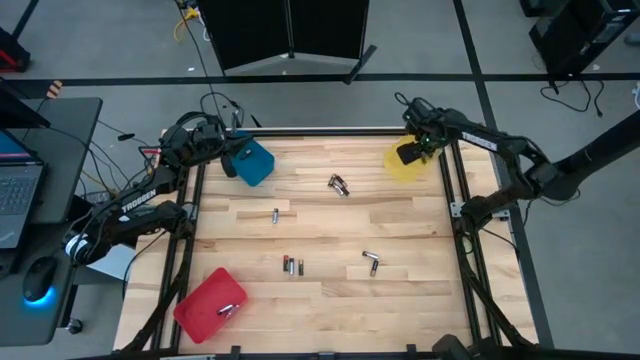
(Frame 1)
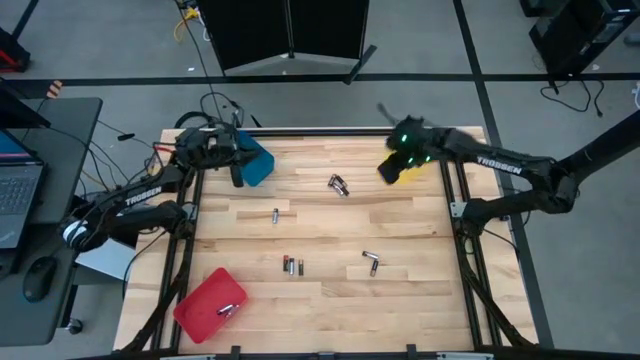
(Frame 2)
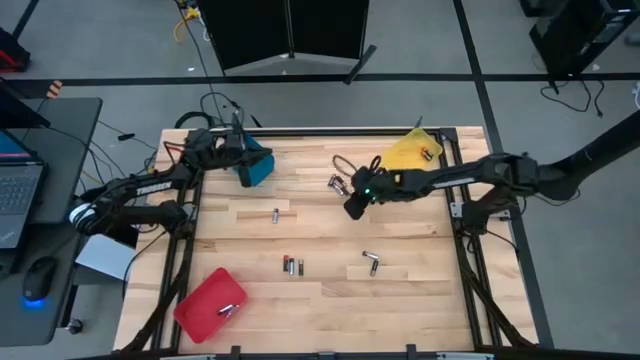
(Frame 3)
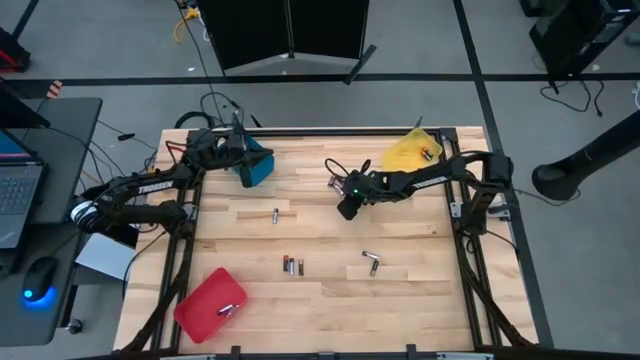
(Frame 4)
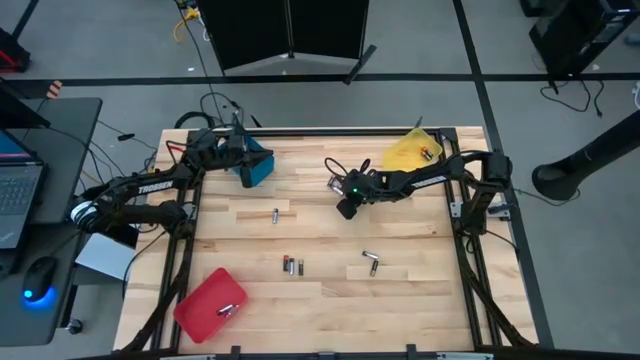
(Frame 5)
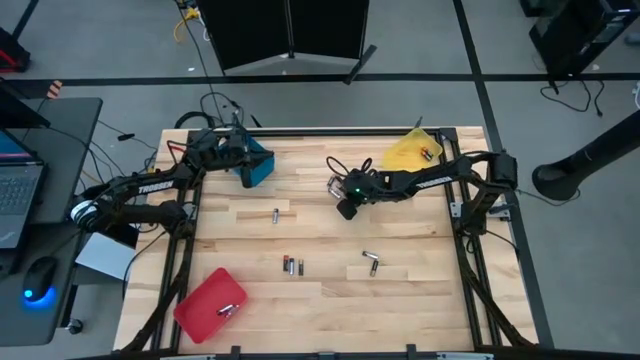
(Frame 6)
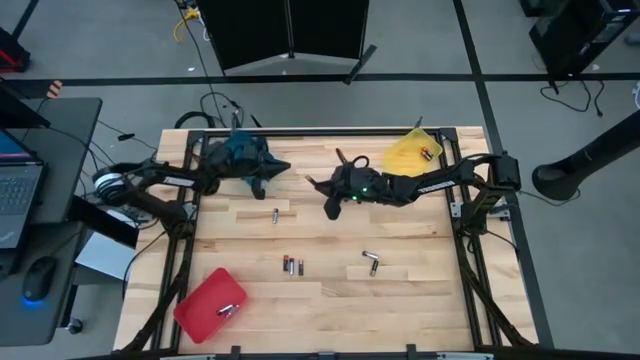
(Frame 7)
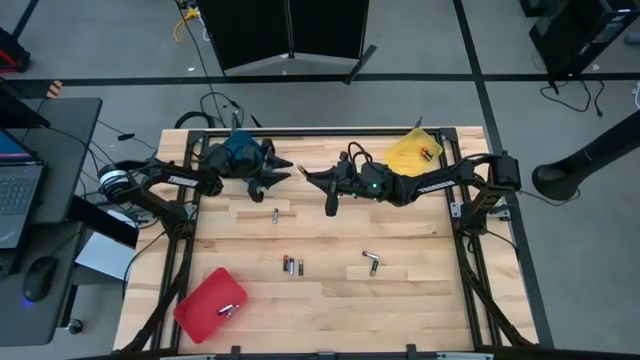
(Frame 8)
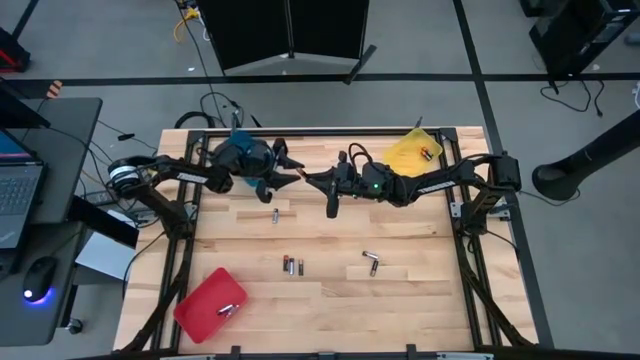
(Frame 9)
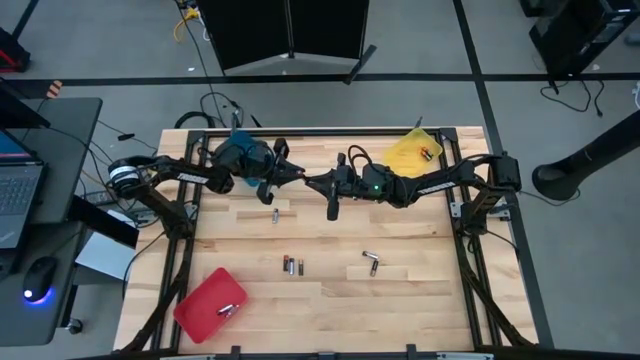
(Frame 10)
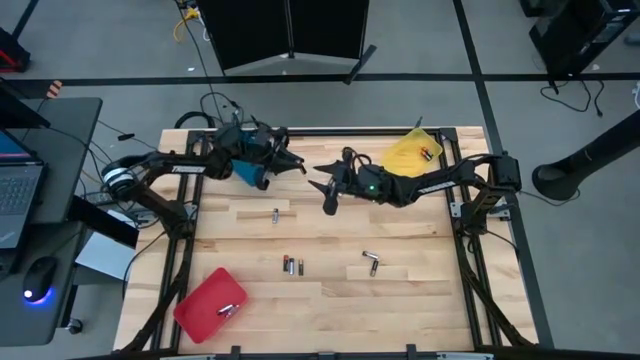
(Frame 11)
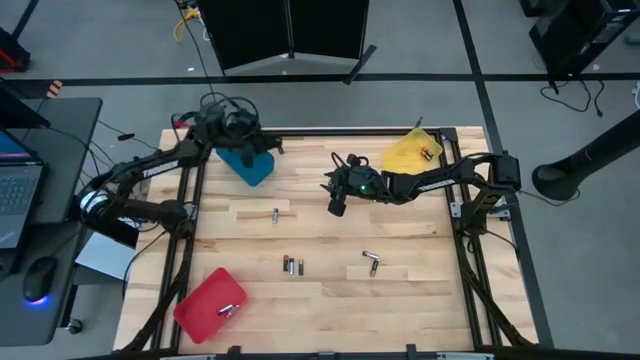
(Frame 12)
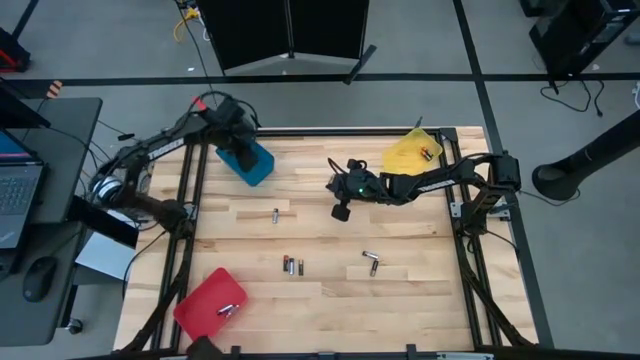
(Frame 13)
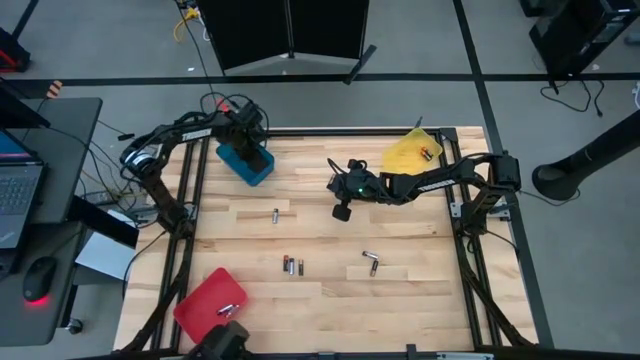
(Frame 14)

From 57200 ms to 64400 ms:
Task: Sort batteries
Put the black brown battery into the blue bin

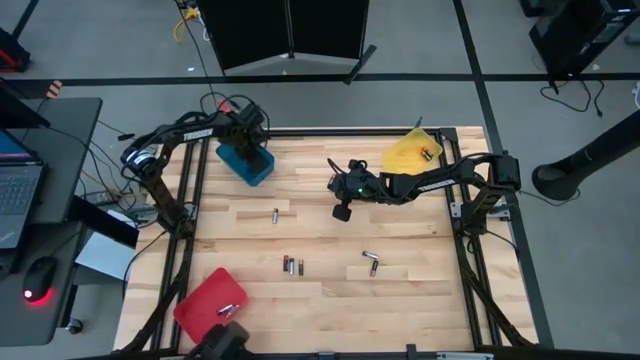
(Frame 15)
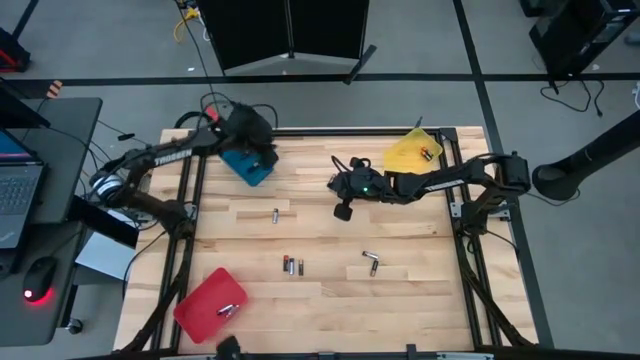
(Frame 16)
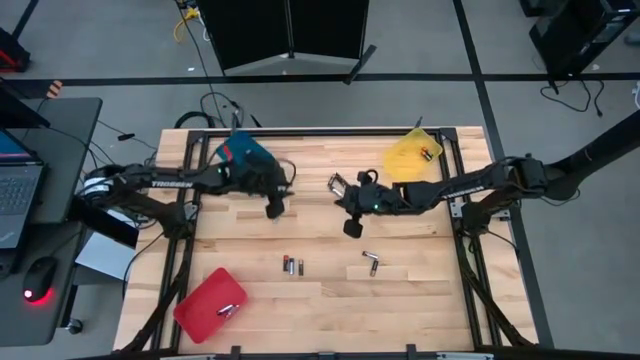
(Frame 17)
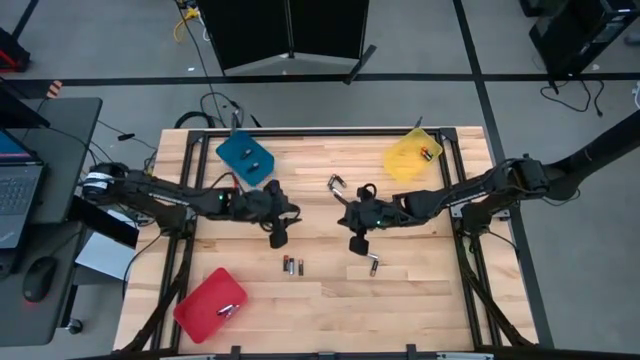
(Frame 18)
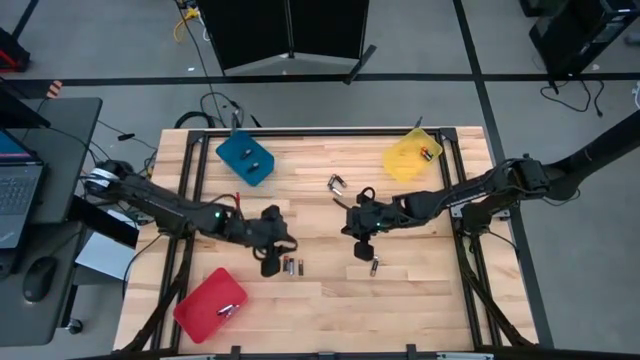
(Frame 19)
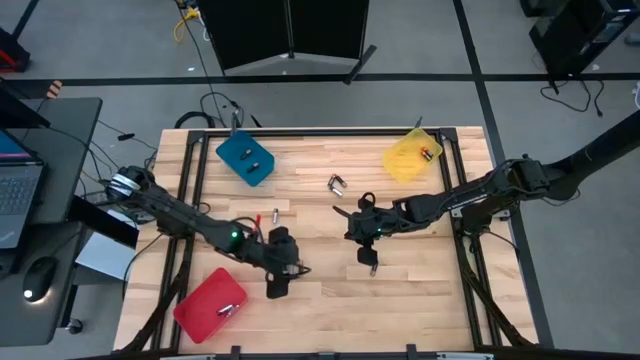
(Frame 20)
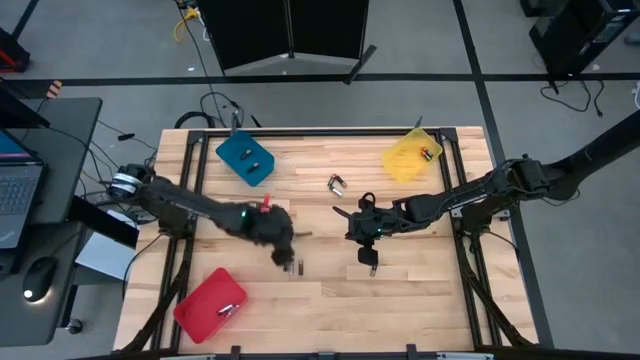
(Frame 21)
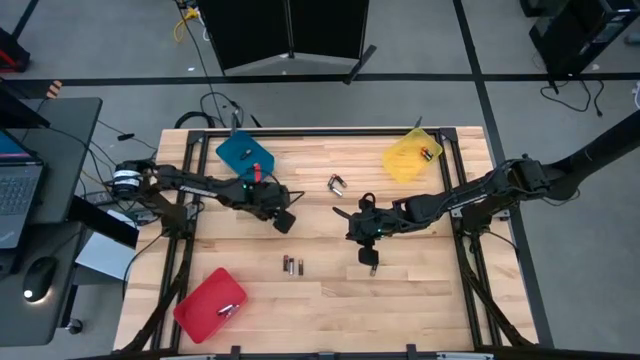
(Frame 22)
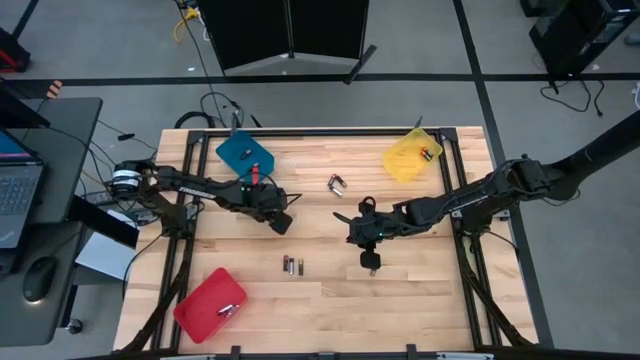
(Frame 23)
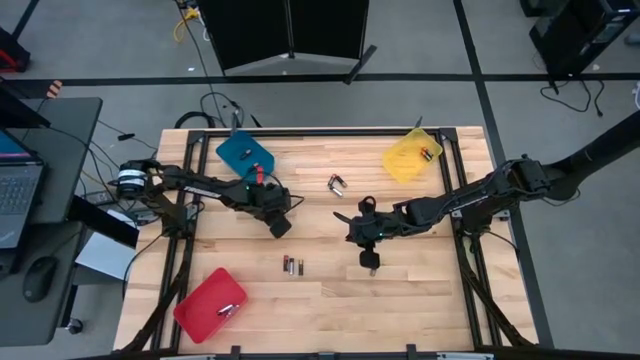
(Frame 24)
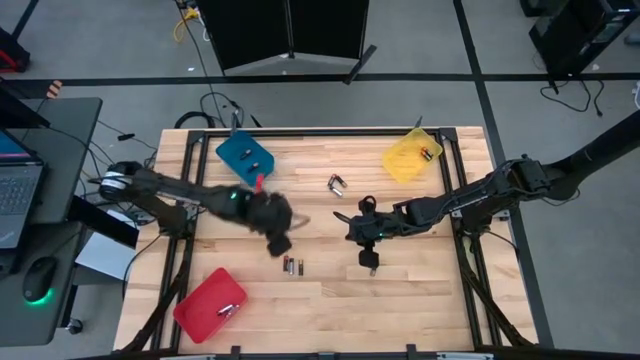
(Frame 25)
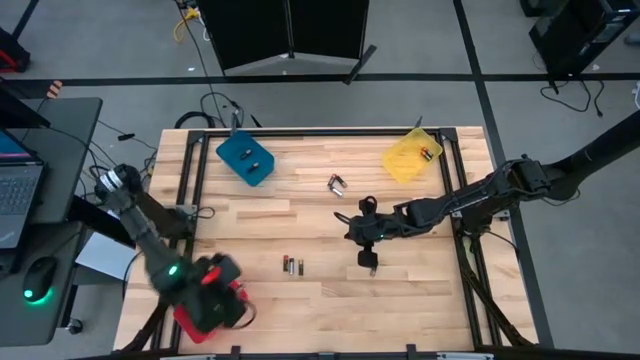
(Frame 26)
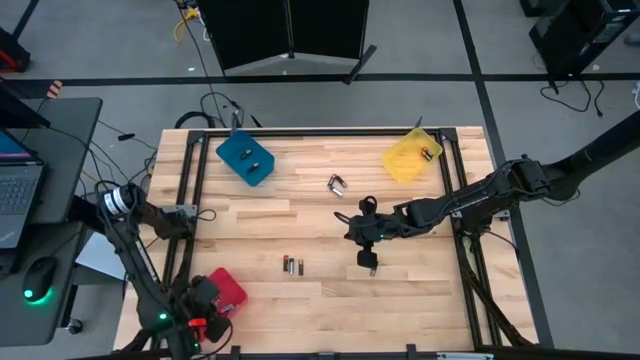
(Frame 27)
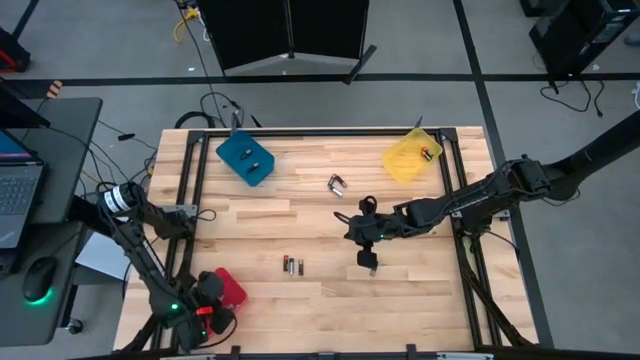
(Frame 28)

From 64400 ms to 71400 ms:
Put the black silver battery into the red bin

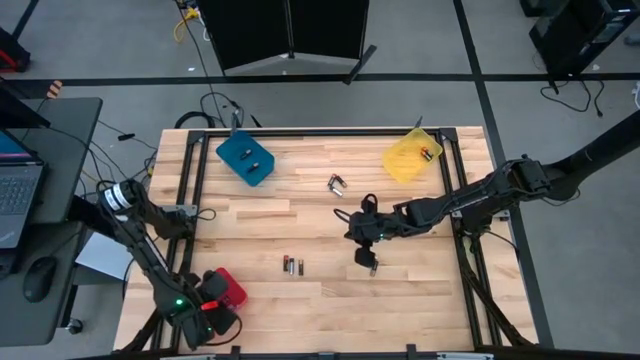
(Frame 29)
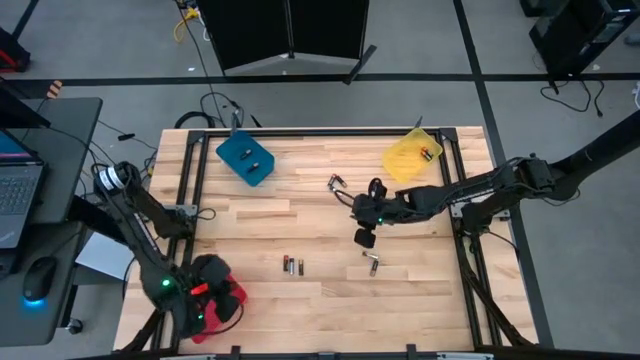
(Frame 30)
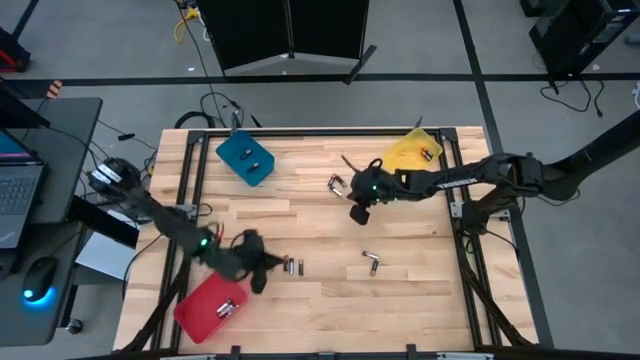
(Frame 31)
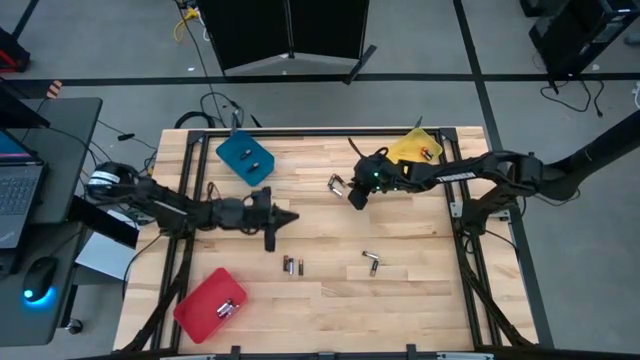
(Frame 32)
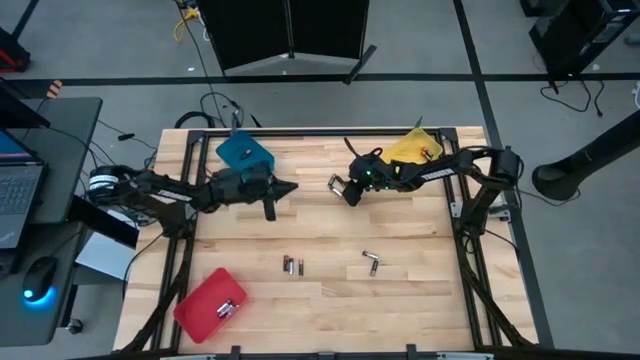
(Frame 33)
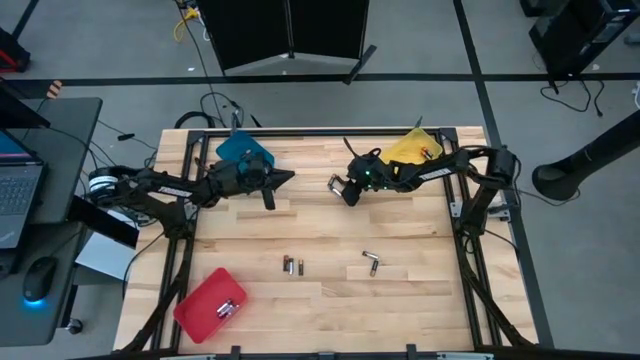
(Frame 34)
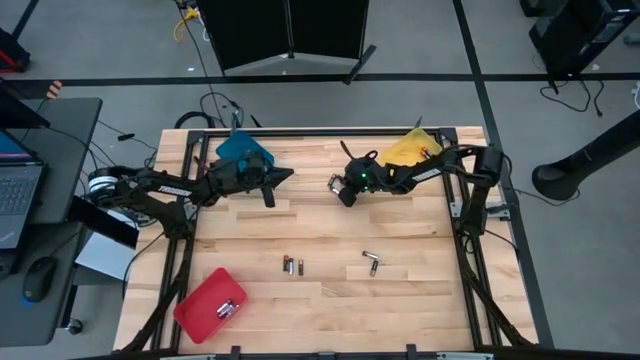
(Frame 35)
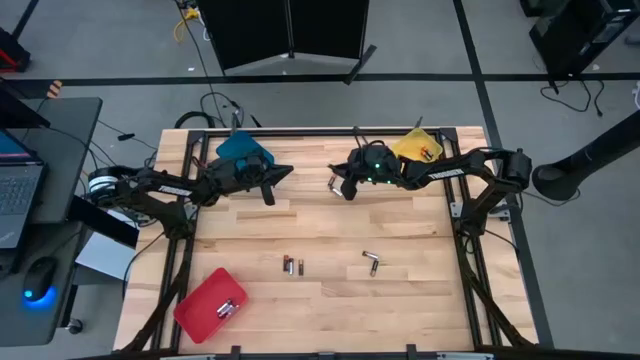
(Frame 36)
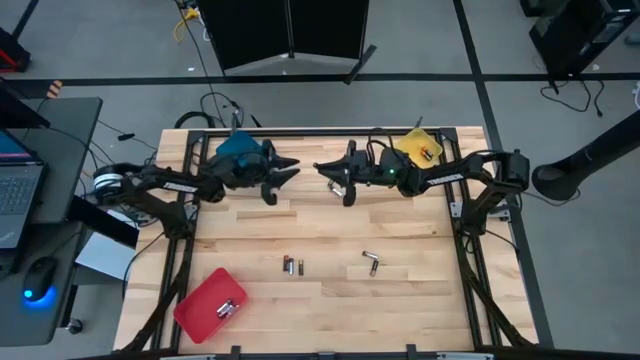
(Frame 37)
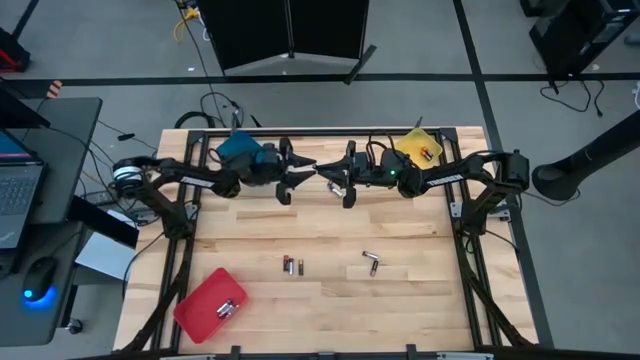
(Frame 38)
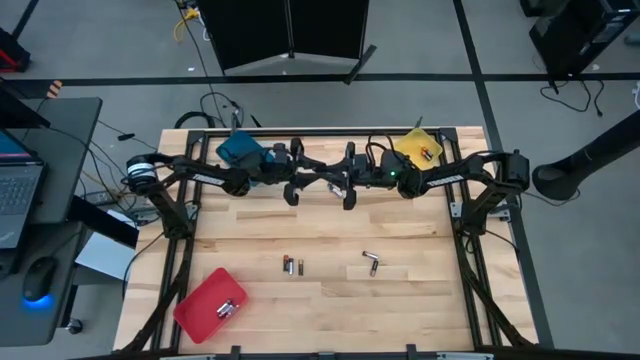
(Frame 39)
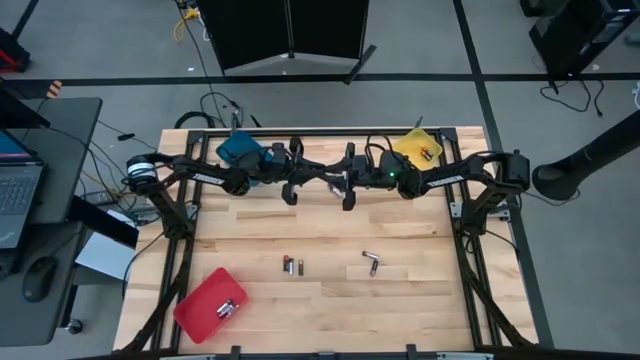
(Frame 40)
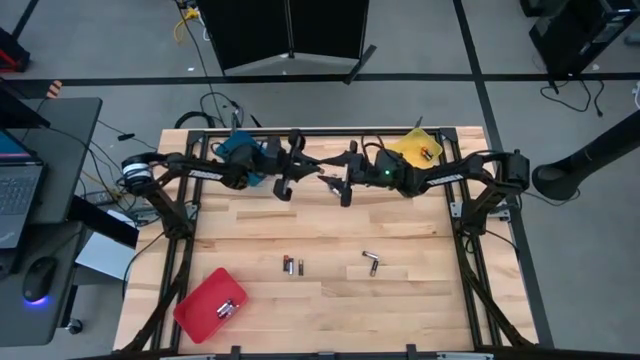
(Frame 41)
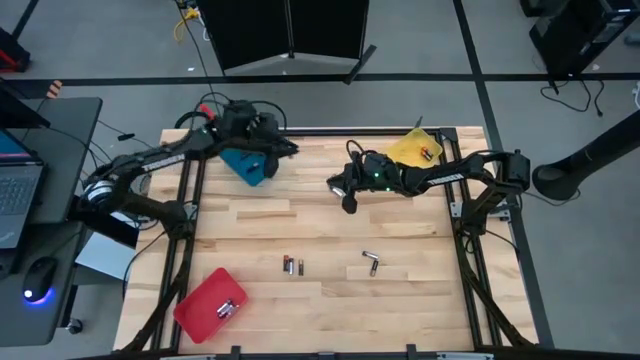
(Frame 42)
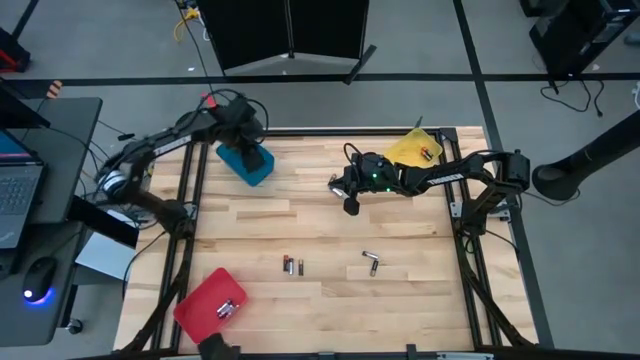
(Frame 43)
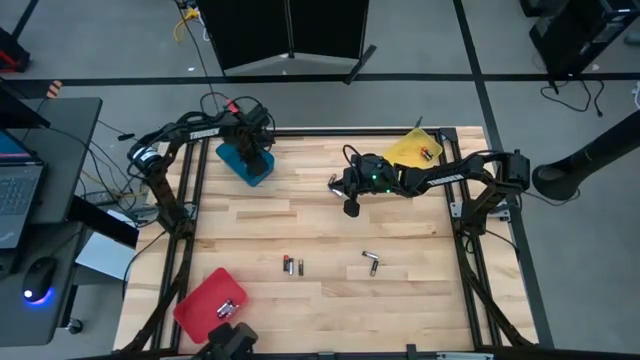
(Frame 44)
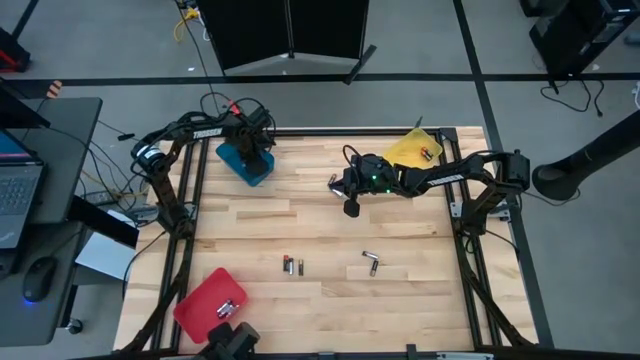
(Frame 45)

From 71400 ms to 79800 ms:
Put the top black brown battery into the blue bin
